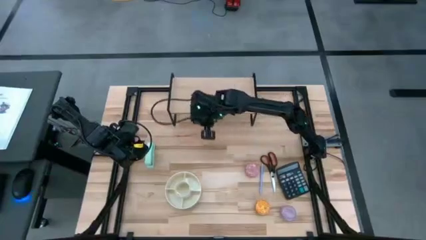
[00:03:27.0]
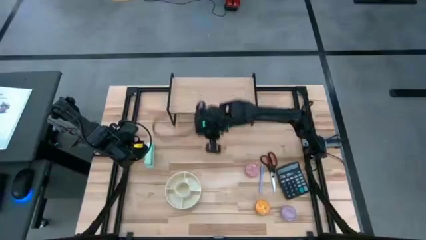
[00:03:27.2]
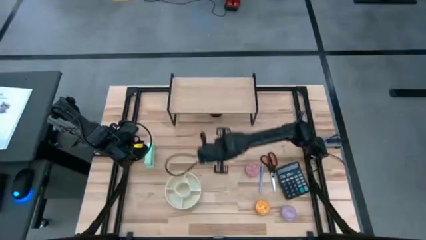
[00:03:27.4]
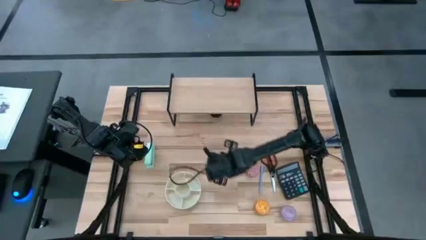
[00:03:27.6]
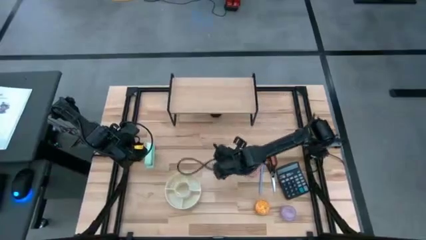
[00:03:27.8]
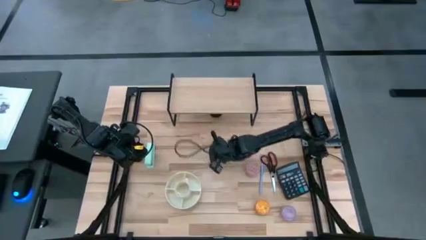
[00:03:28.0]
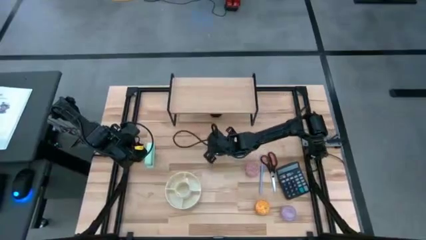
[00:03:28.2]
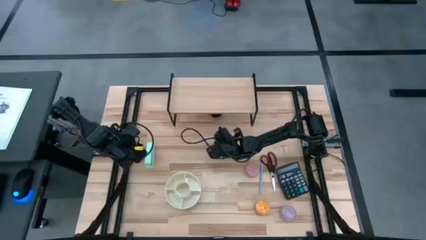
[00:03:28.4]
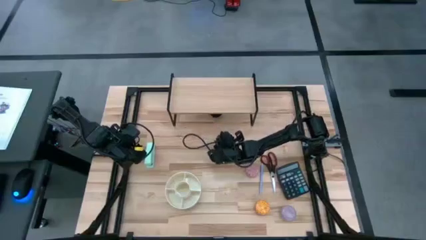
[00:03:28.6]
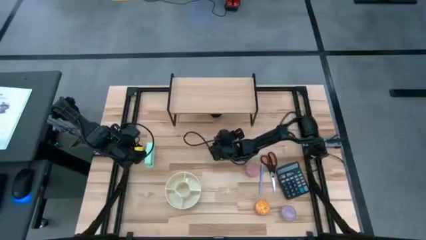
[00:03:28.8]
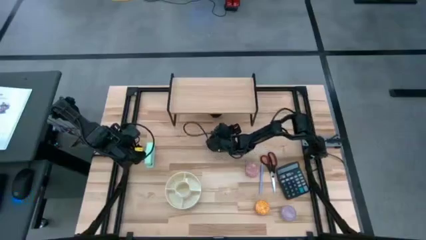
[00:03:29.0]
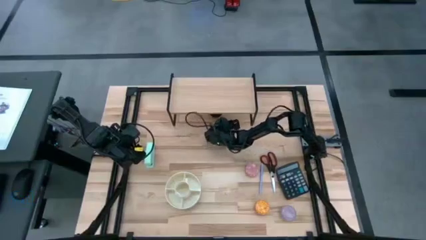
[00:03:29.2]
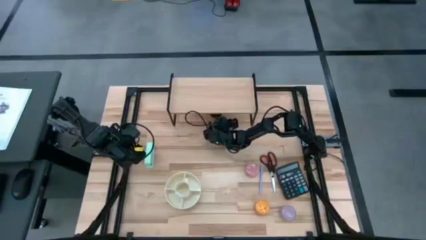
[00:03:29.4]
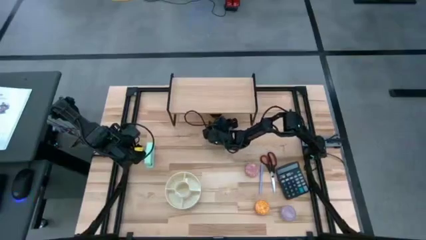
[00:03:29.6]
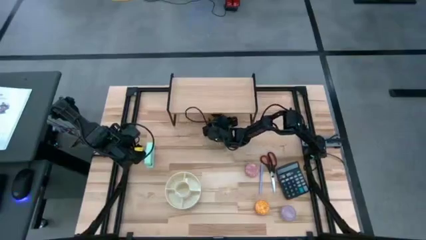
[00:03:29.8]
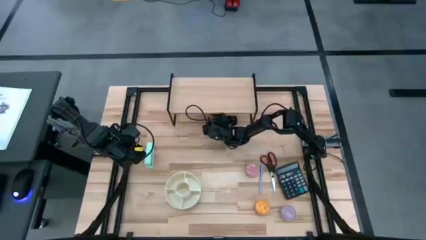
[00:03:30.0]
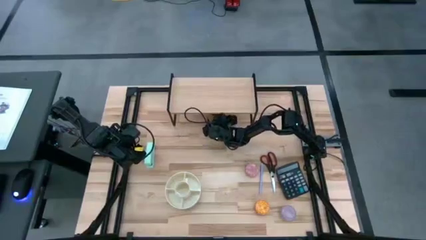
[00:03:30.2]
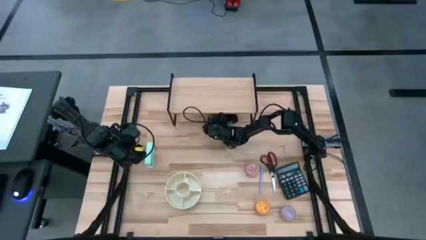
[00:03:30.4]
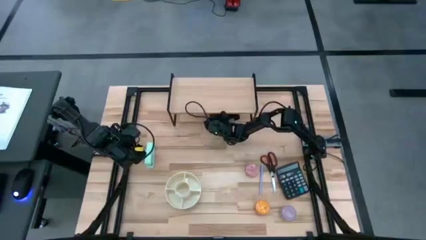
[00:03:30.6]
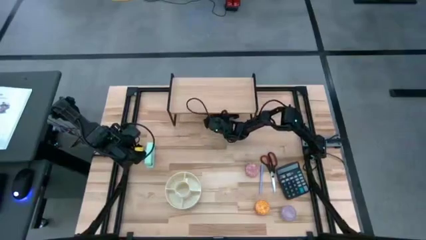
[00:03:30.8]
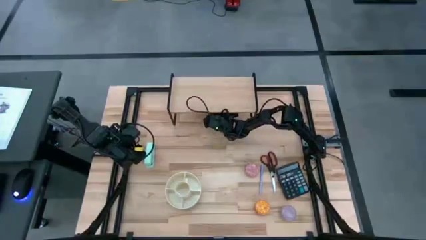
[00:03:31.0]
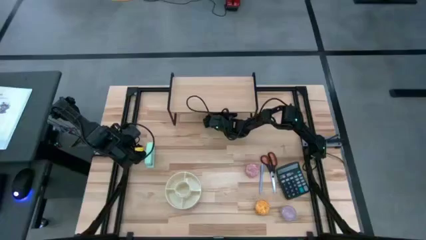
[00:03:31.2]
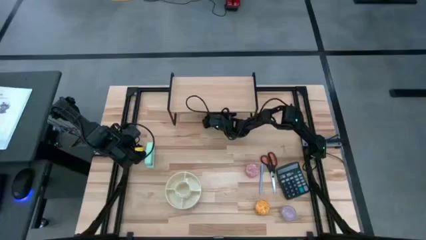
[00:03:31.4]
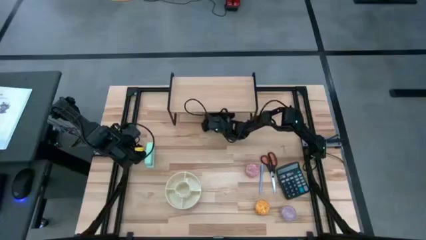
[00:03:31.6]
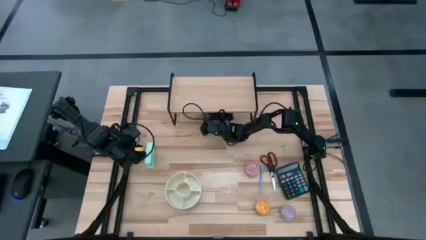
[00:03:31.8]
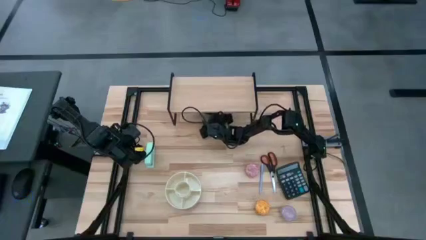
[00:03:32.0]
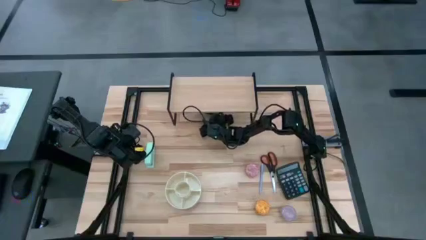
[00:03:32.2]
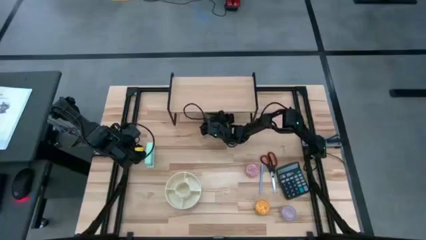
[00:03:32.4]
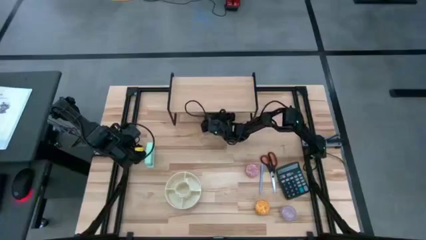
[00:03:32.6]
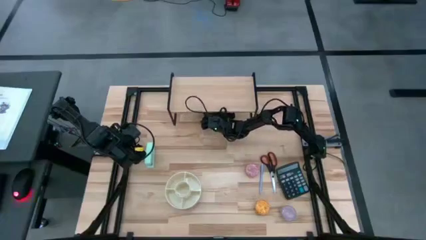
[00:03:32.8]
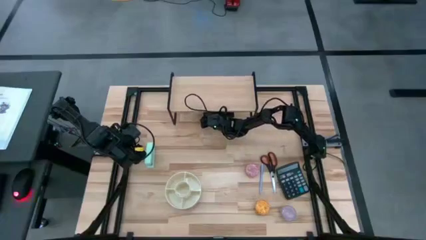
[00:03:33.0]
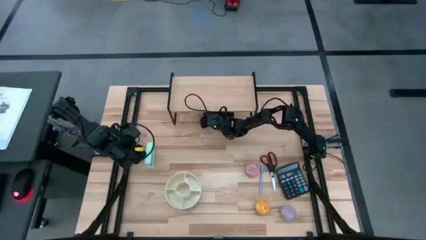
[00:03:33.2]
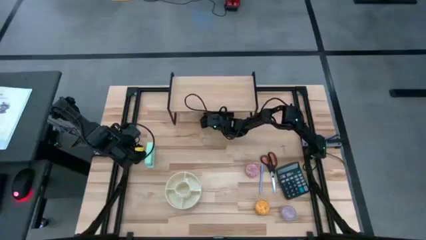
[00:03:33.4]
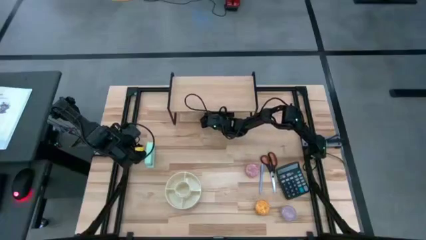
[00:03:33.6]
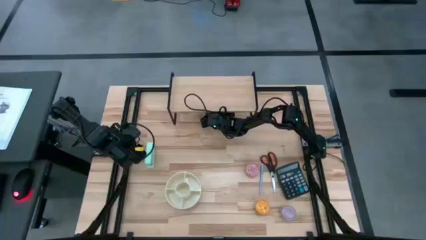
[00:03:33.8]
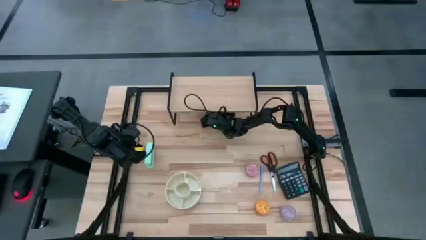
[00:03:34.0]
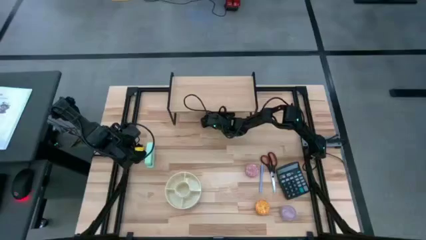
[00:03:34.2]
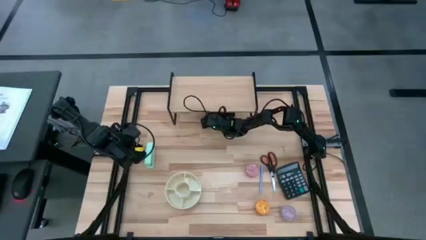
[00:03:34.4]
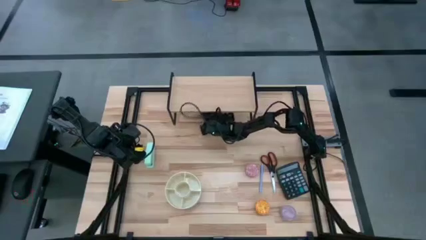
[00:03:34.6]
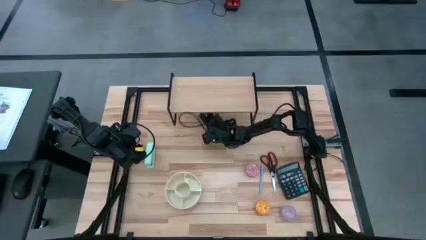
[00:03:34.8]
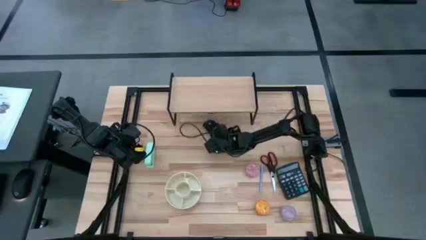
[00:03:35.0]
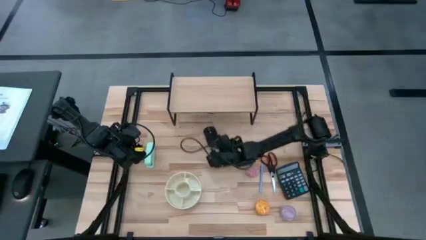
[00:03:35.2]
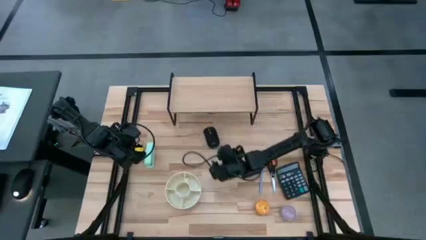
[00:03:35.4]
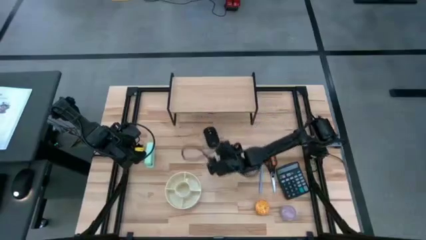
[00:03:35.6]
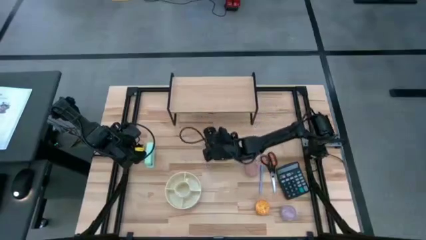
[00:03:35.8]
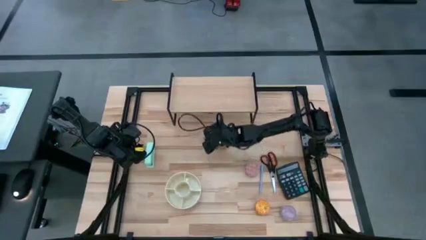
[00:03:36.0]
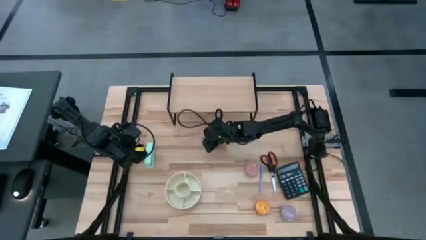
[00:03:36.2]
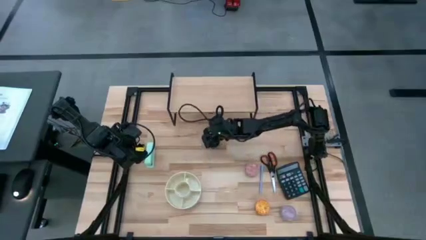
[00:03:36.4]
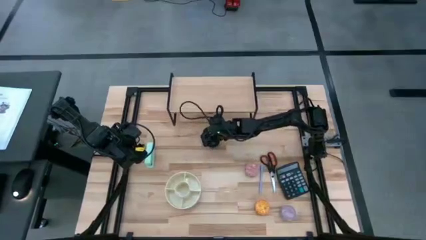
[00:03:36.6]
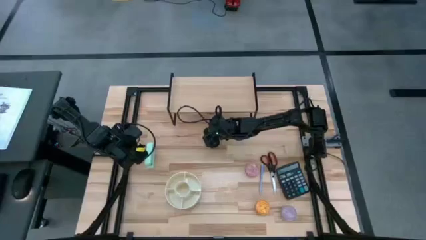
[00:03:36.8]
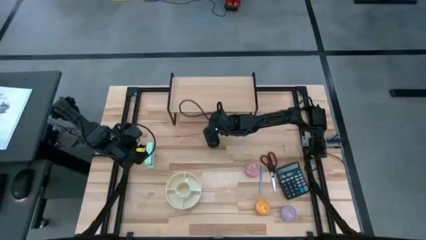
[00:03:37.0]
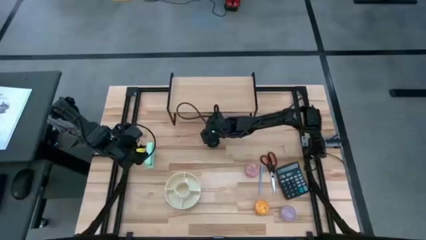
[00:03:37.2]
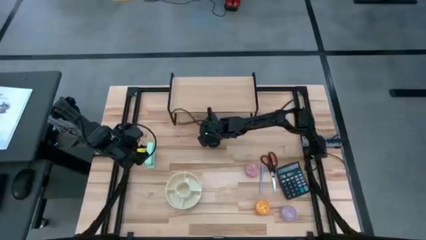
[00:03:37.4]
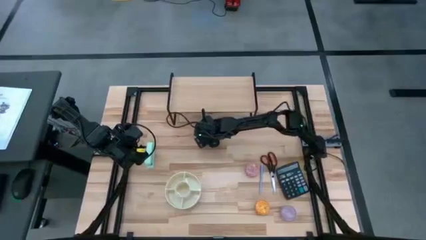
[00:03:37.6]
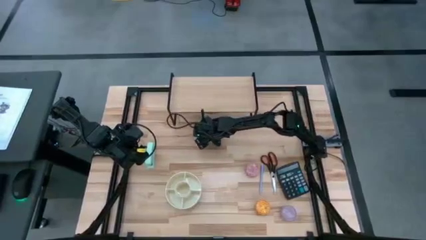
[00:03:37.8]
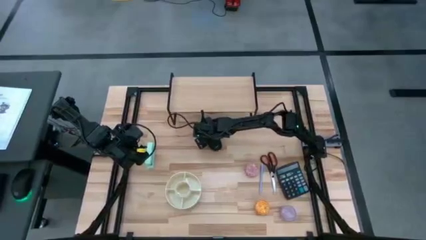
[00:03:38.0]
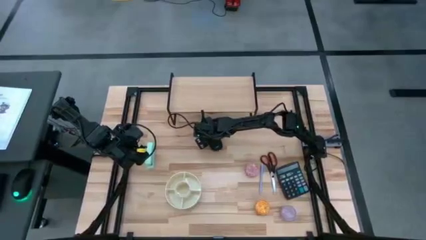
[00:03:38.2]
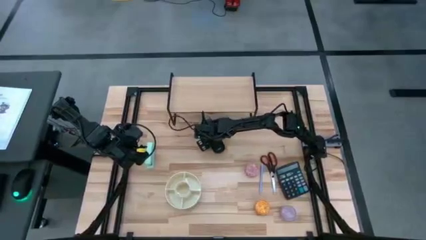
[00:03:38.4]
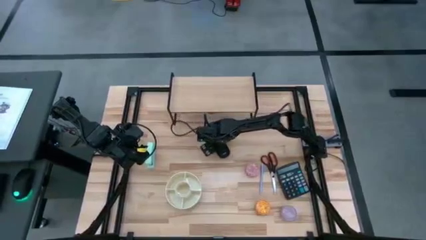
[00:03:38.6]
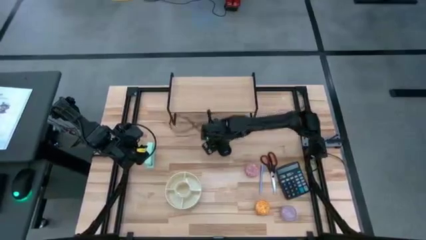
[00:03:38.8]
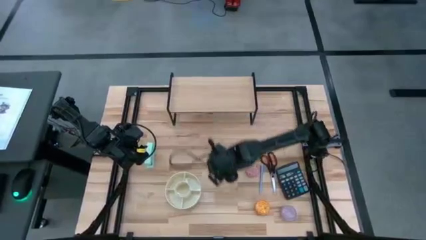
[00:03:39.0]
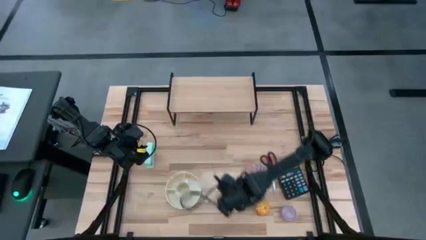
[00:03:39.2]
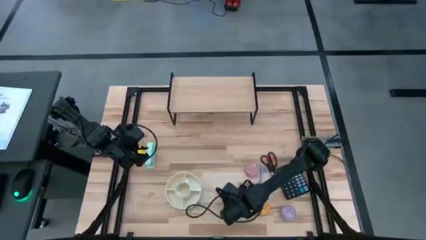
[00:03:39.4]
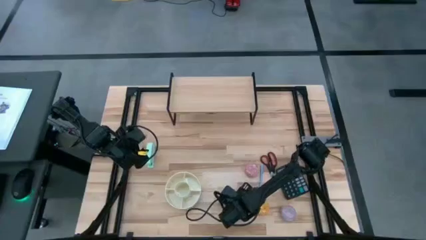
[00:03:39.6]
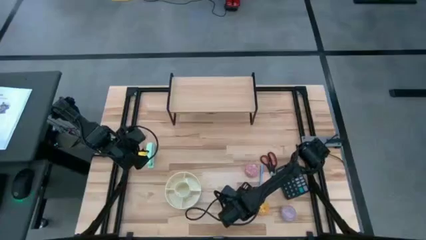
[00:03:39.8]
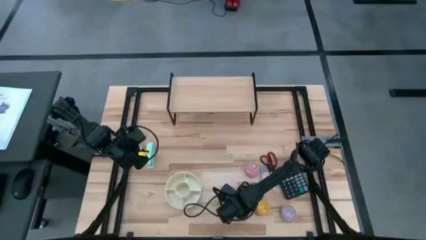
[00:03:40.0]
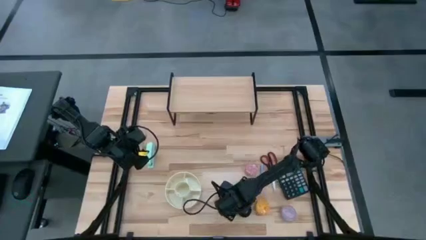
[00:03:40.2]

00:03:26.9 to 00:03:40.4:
Task: Stock shelves
Remove the black mouse from under the shelf
